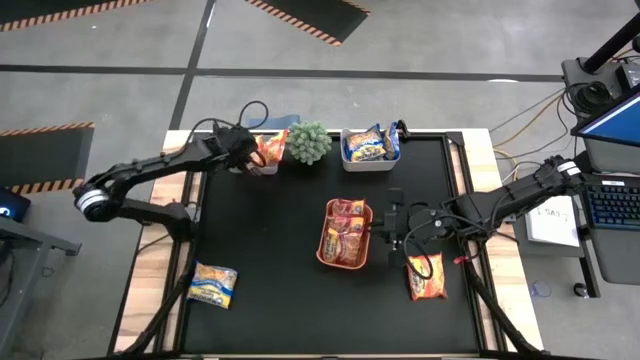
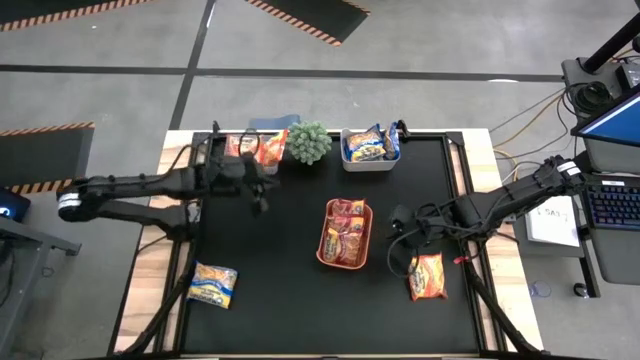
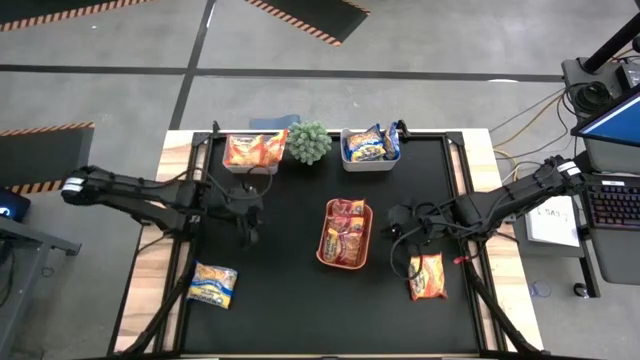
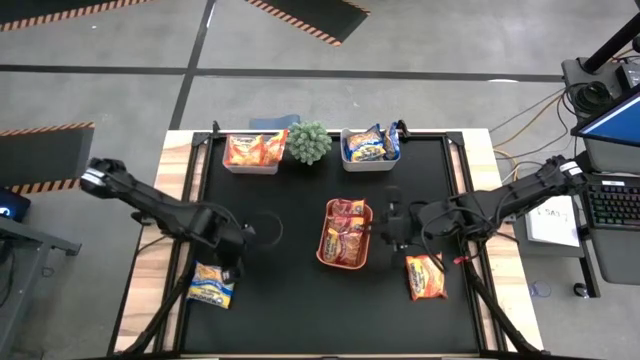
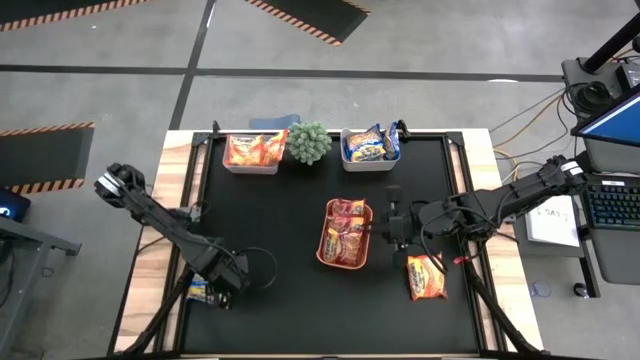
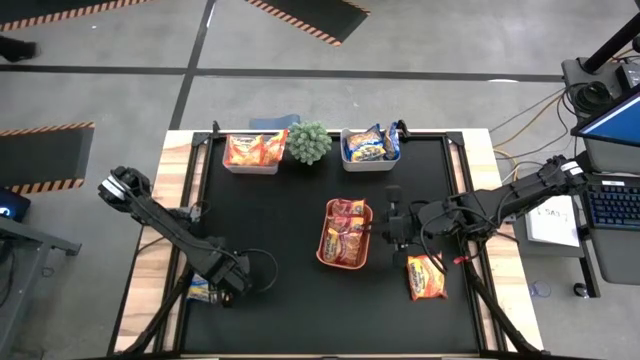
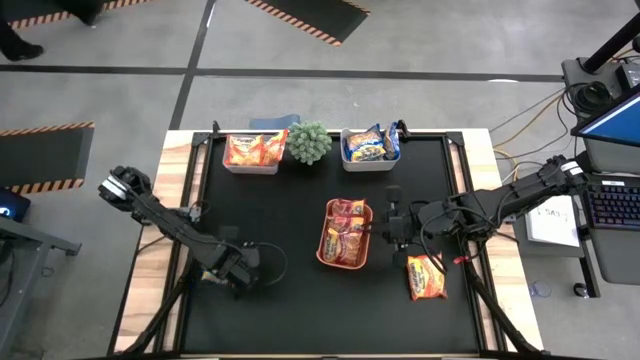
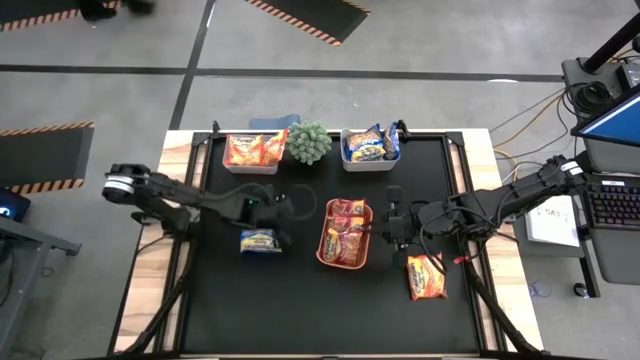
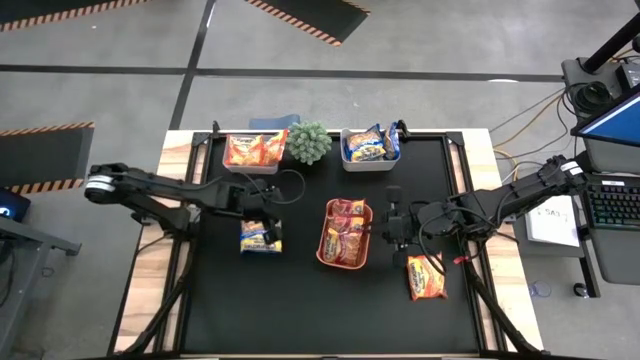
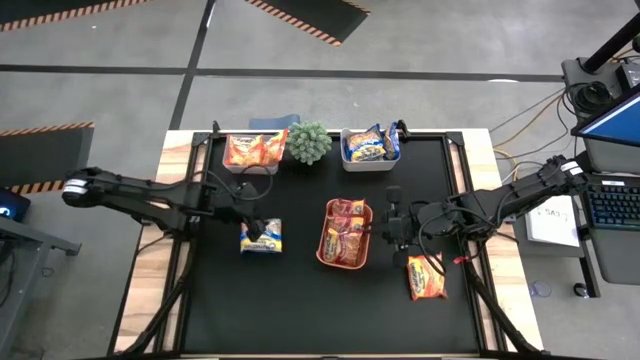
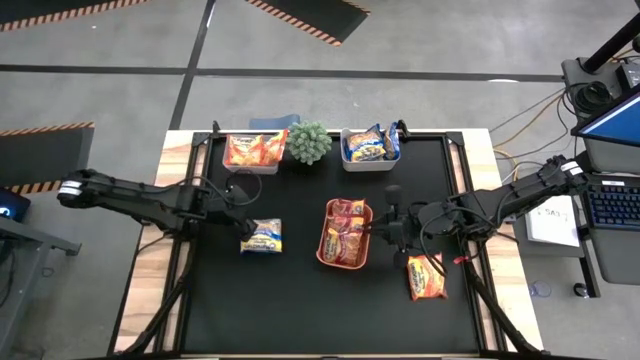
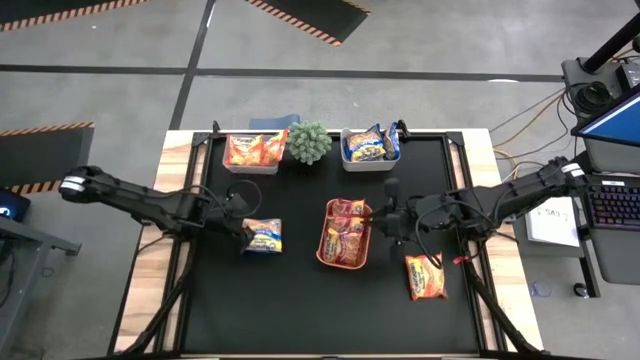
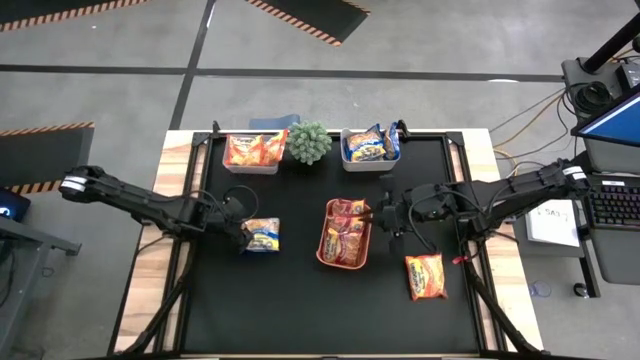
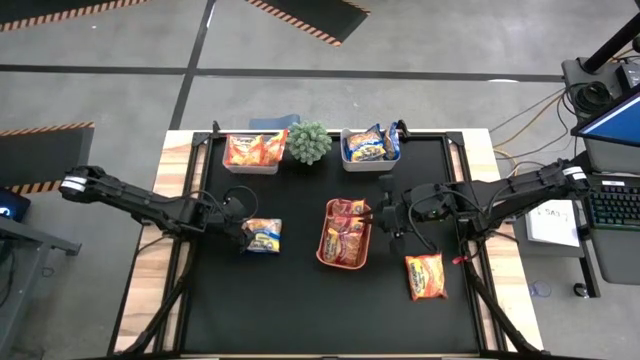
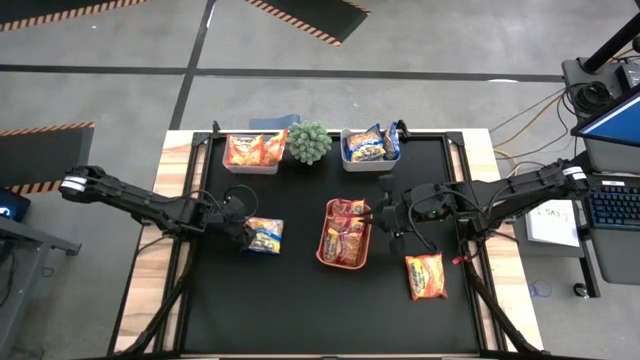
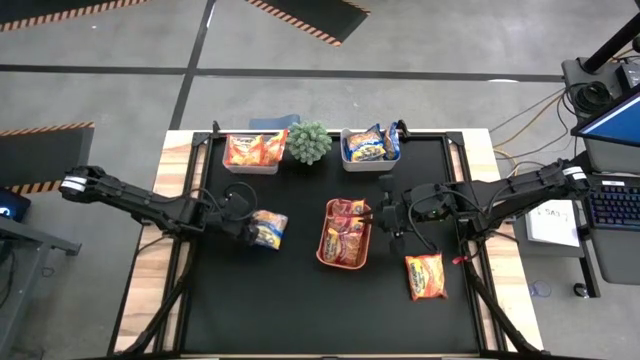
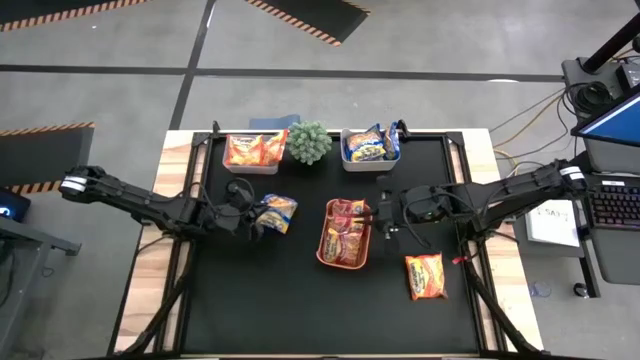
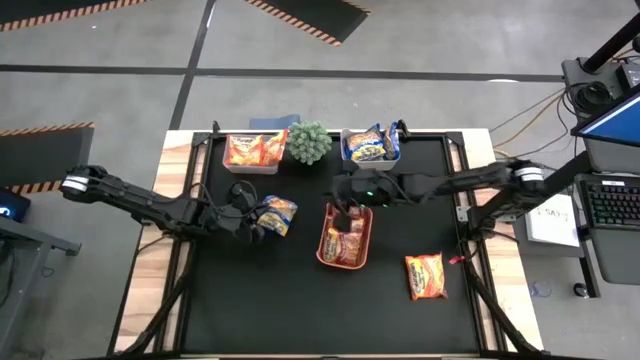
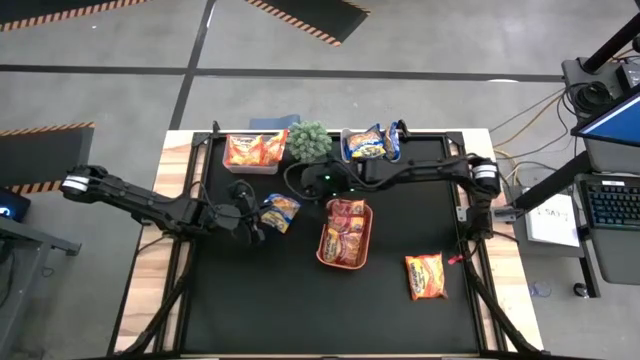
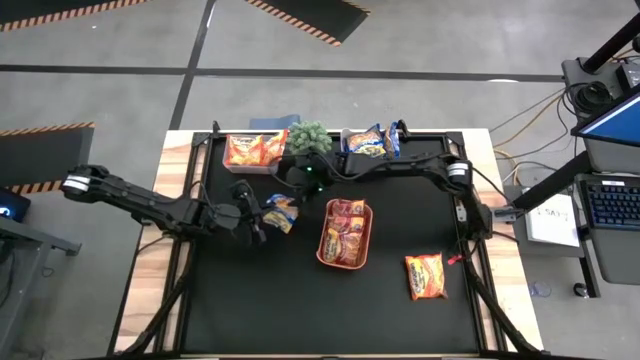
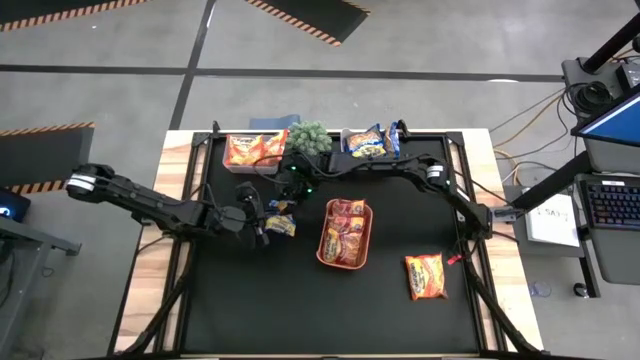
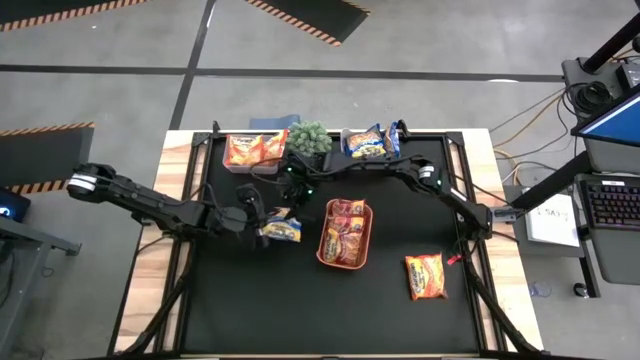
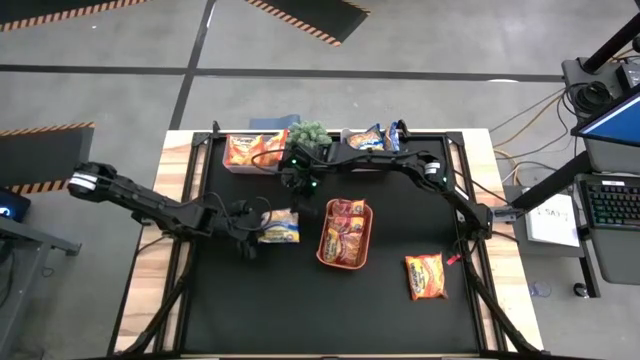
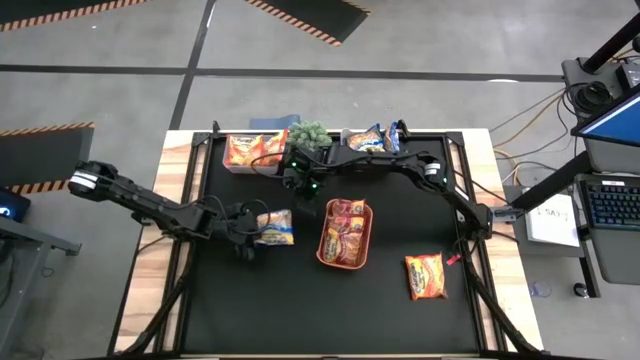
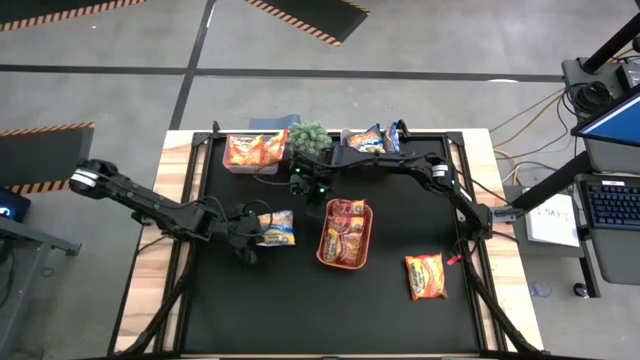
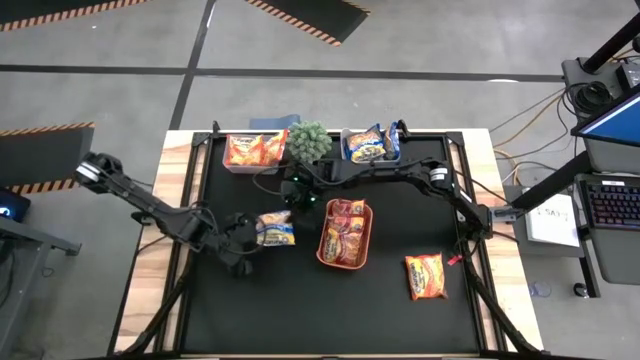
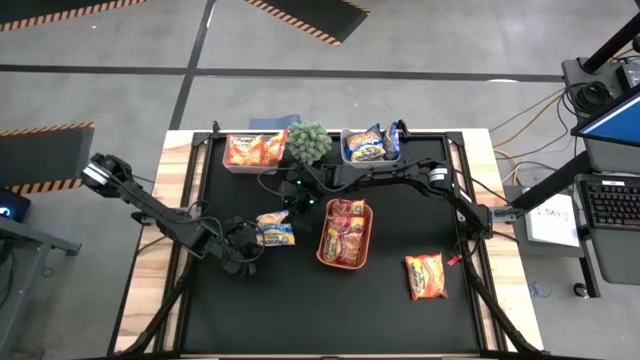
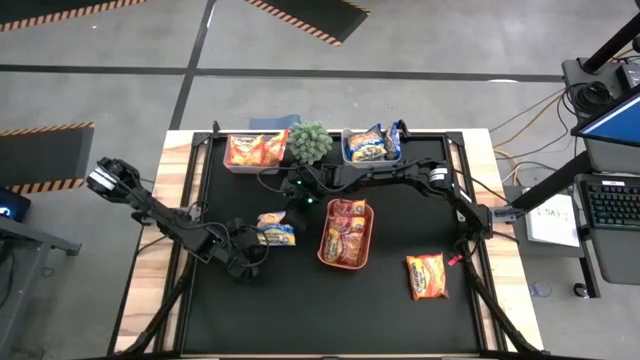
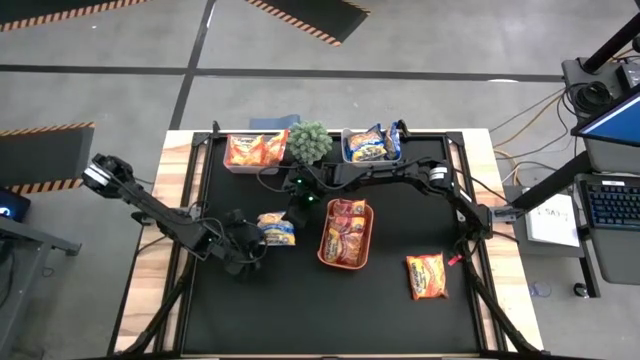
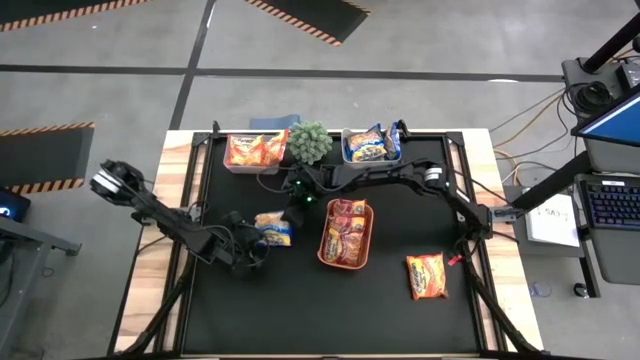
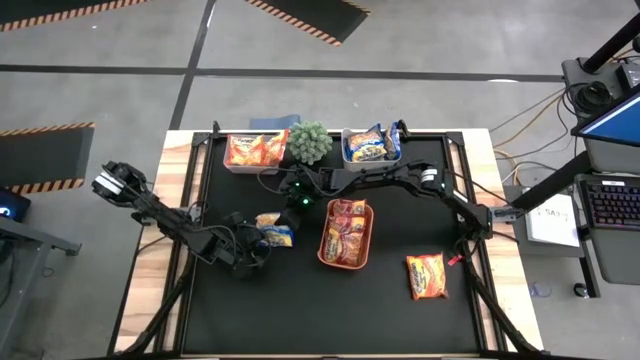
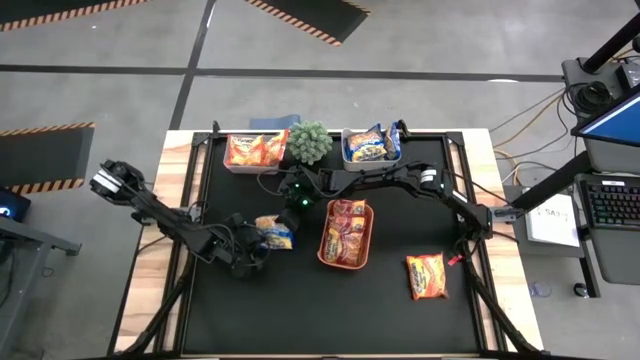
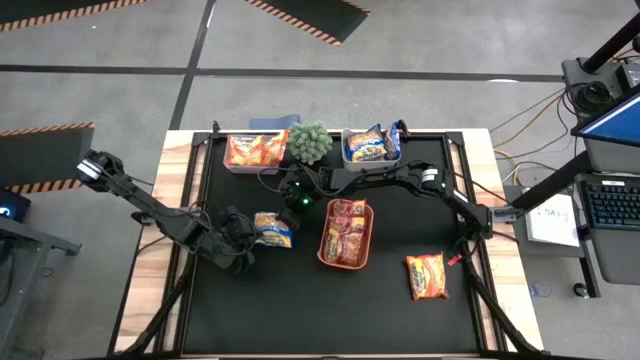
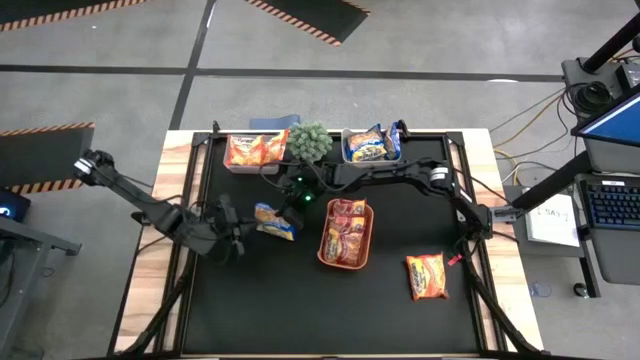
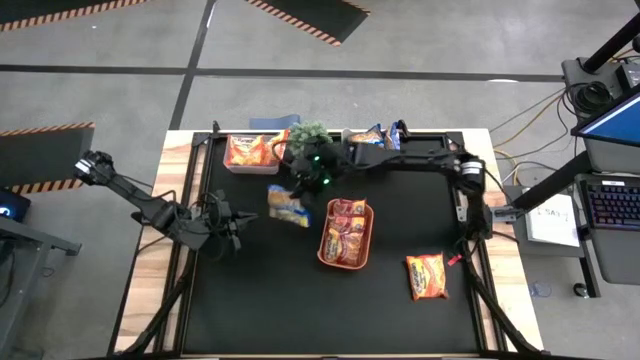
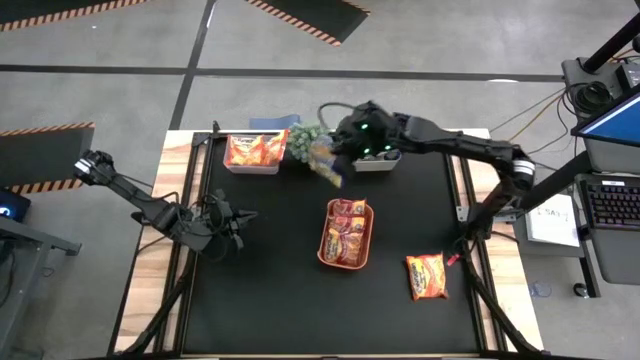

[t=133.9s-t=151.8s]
Task: Sort Maruchan noodles
Put the blue noodle pack into the gray bin

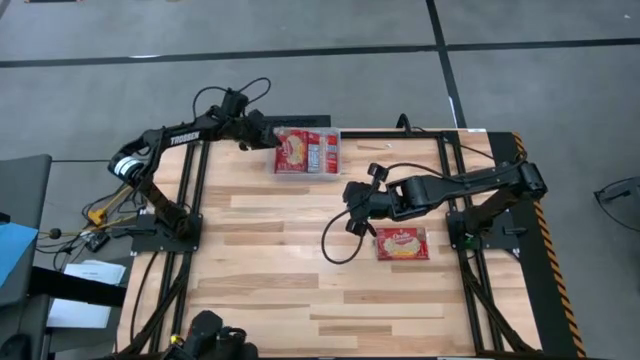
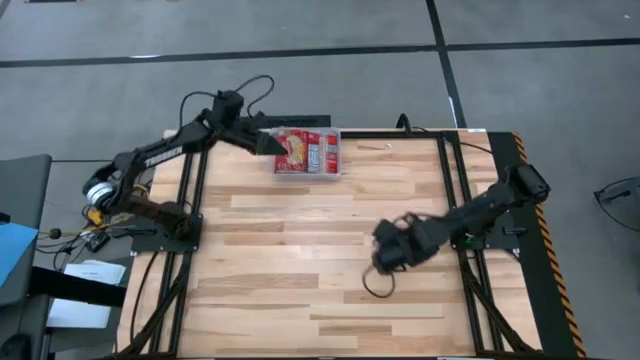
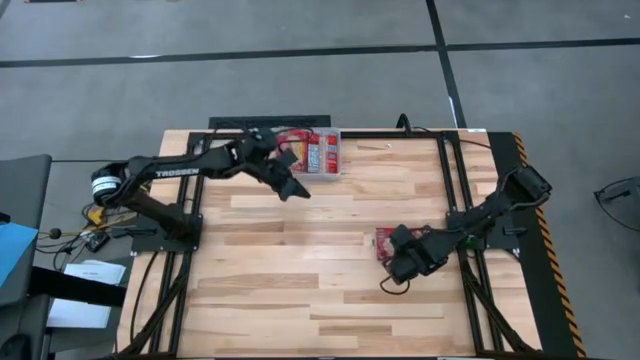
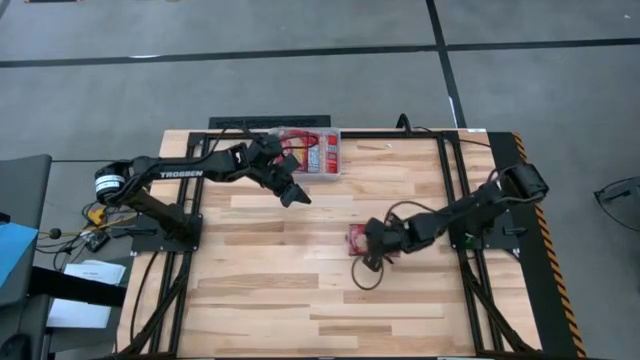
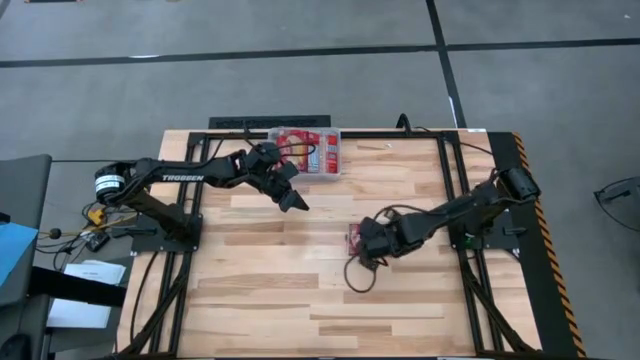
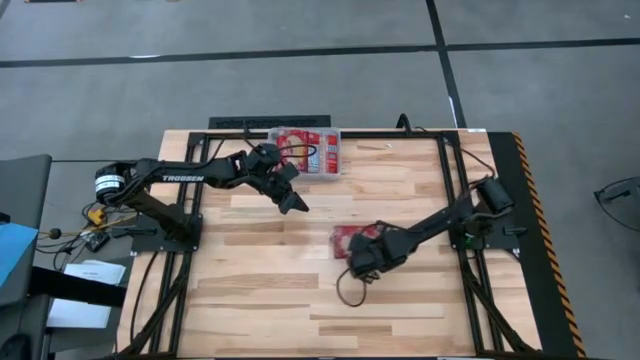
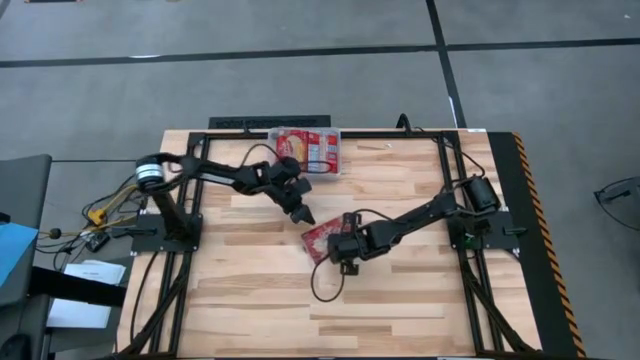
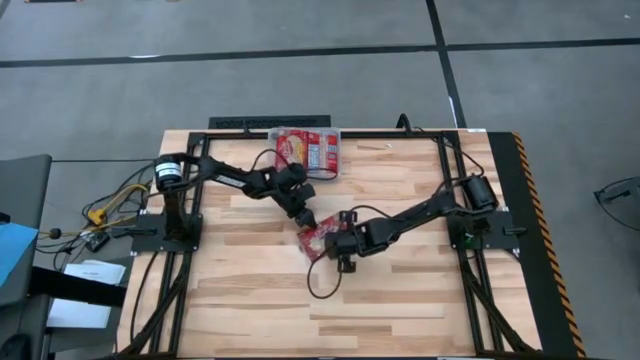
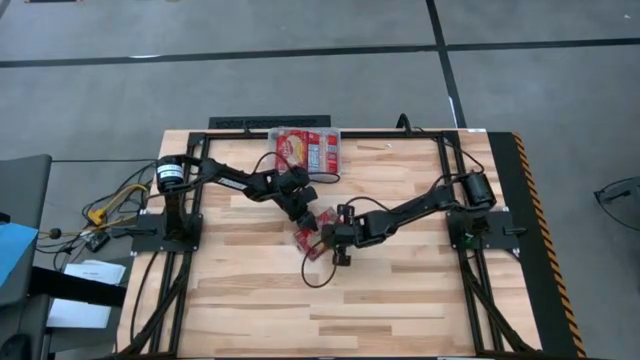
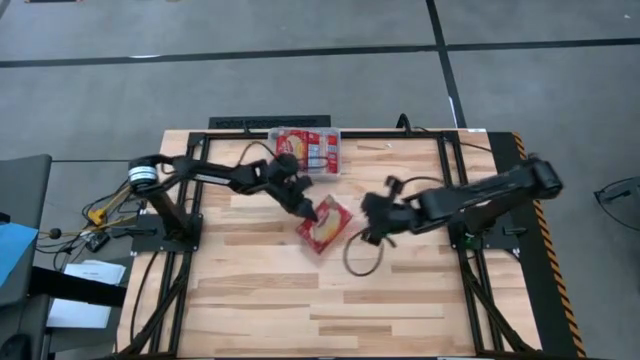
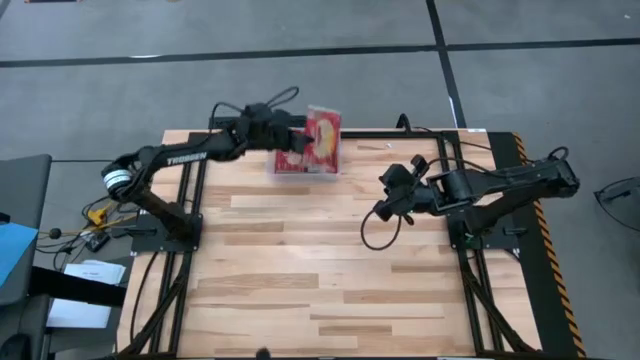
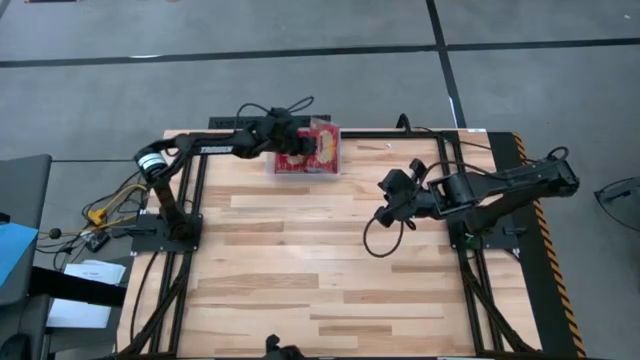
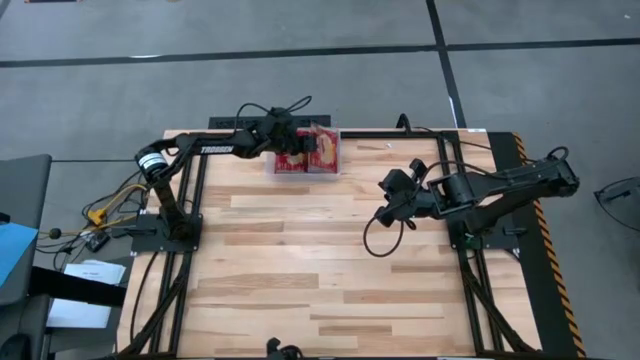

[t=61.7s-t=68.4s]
Task: Sort popcorn bags into baskets
Put the red popcorn bag into the transparent bin
